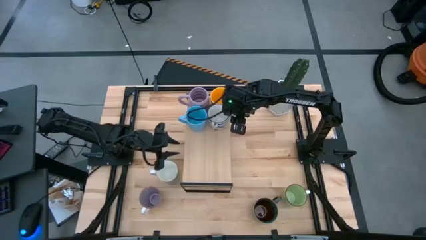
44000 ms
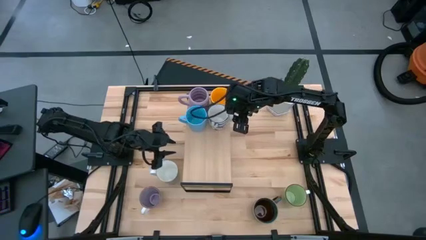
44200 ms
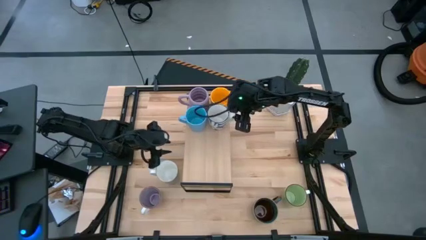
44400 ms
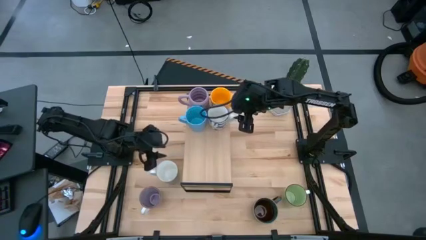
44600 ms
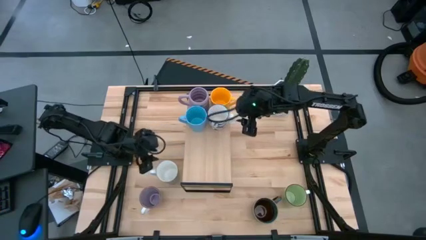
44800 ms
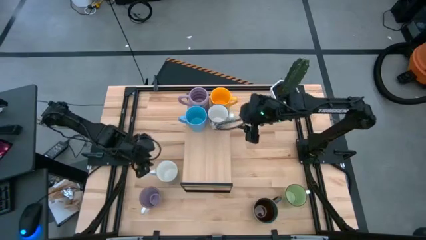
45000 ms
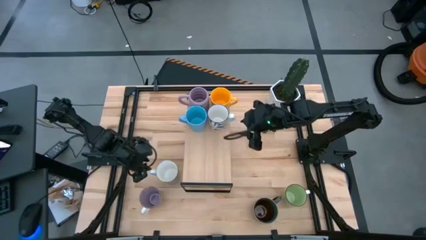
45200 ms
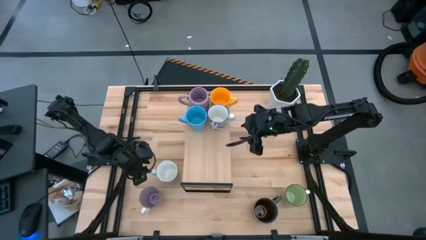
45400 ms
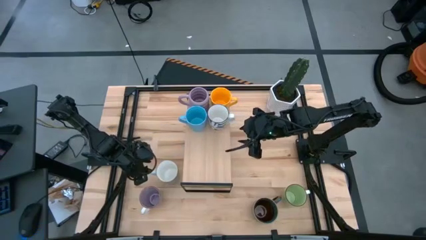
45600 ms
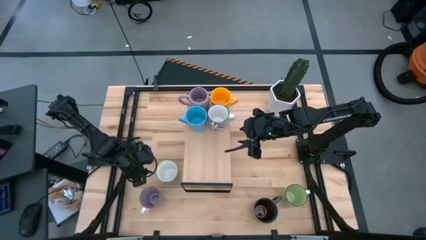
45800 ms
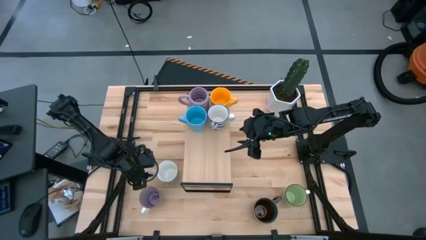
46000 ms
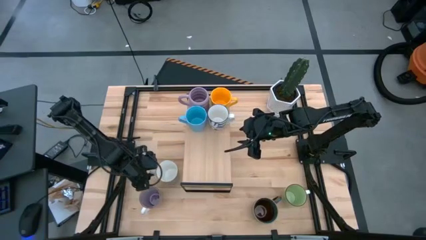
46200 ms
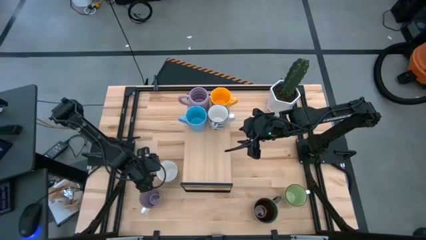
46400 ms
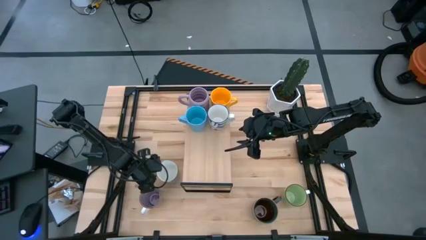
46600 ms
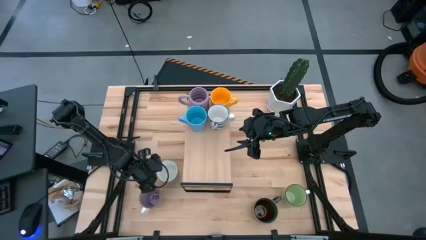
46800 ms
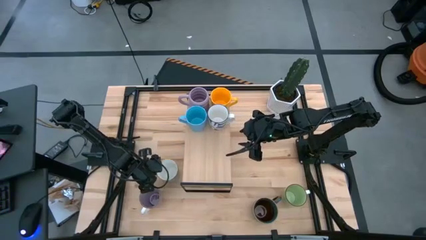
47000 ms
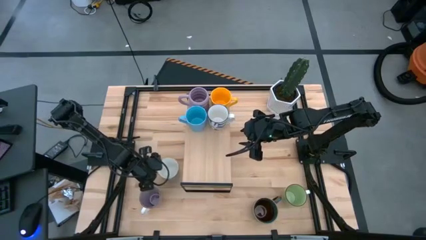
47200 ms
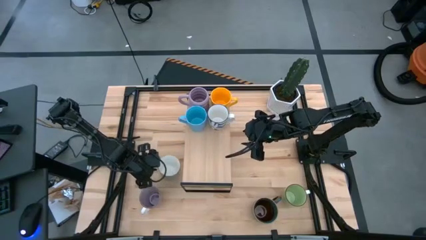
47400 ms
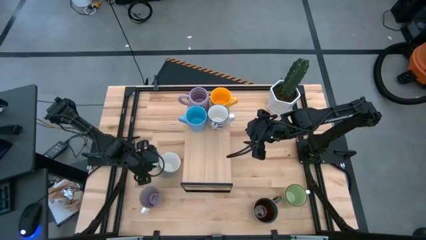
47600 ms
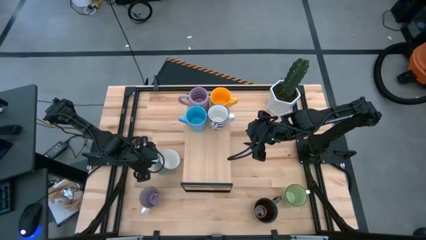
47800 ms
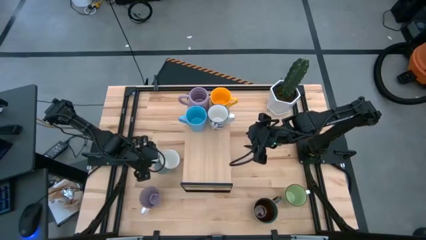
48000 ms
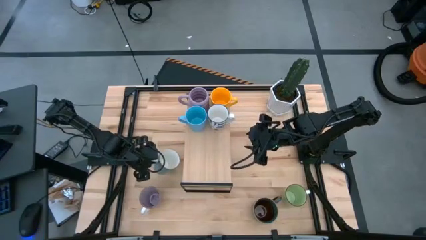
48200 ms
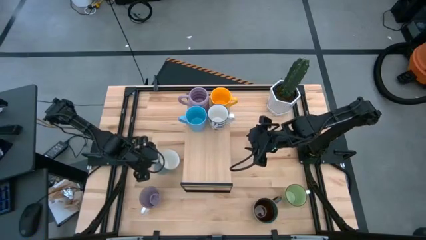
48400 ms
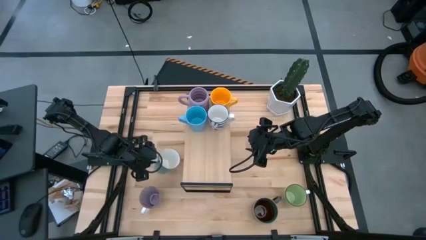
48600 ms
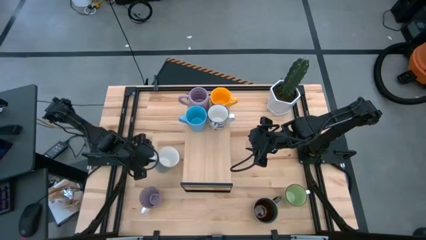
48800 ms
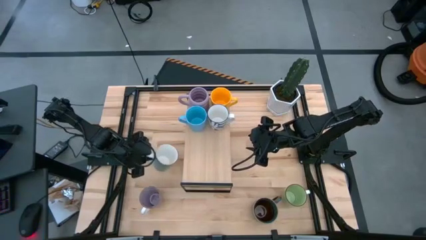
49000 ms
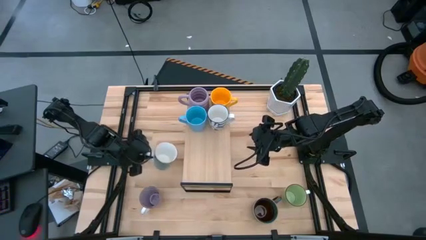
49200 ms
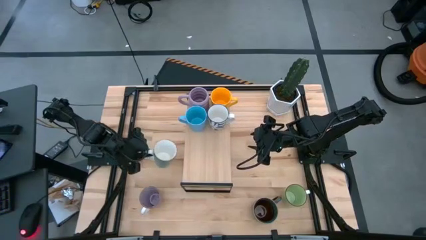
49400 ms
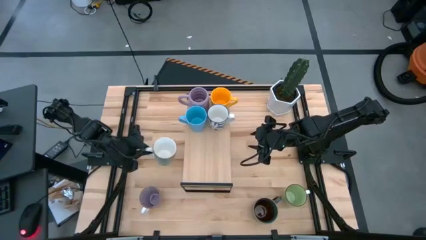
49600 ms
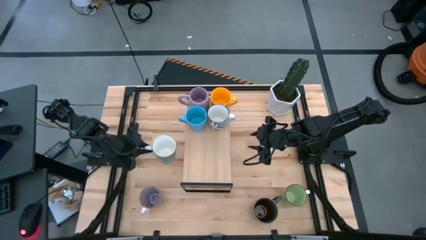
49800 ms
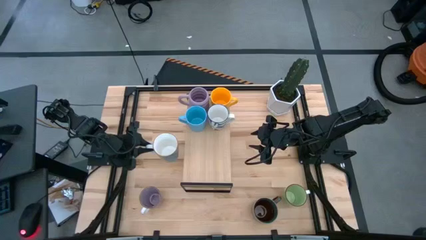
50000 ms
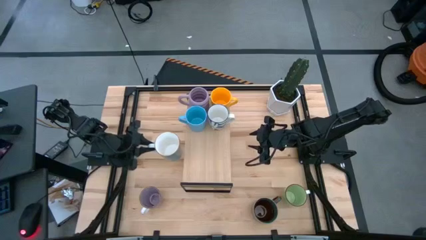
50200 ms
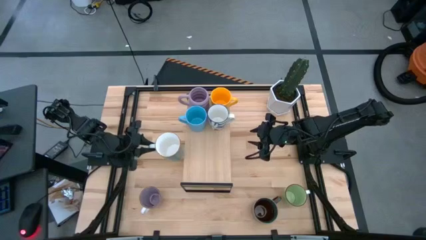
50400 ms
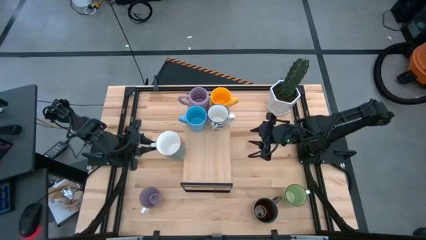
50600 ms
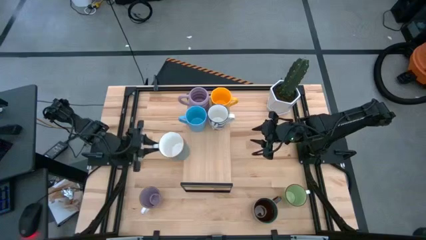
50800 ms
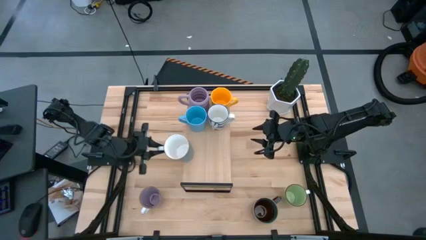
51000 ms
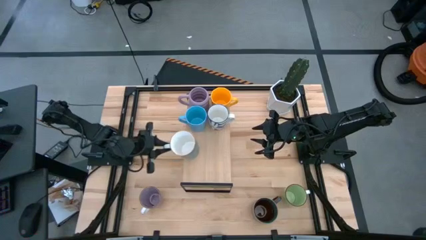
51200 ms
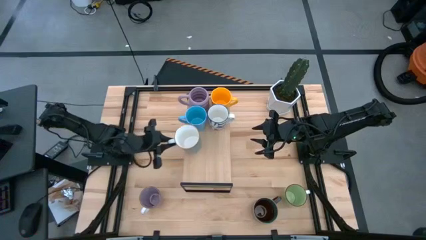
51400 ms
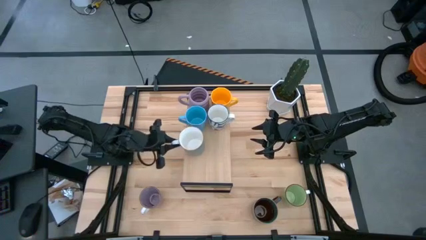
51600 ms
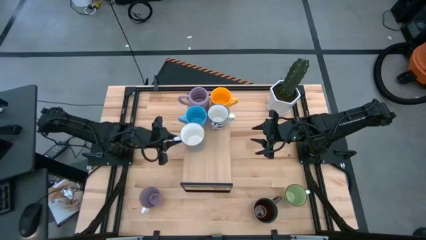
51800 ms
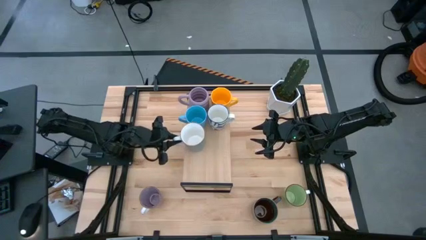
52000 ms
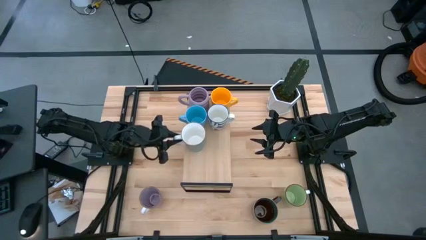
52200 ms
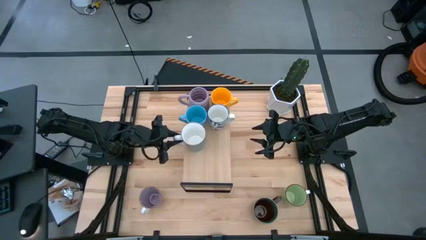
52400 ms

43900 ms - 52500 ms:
Task: Place coffee mugs
Put the blue mug on the shelf

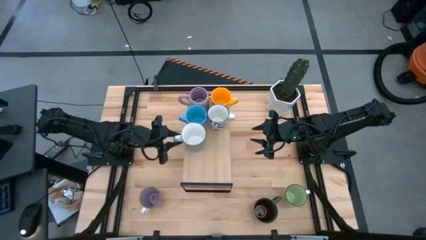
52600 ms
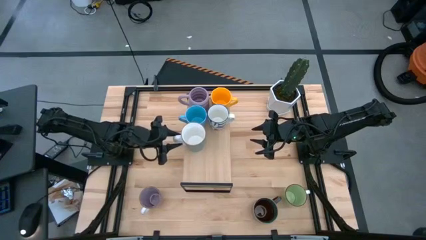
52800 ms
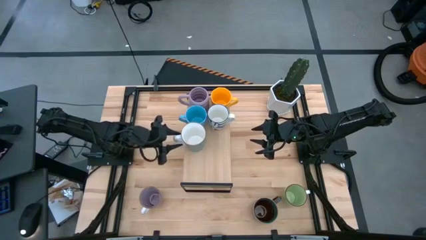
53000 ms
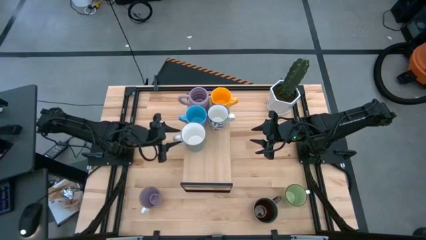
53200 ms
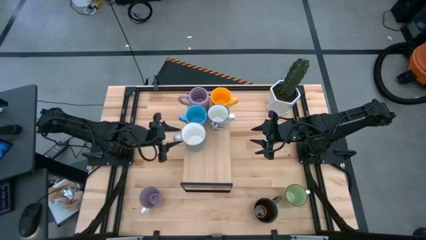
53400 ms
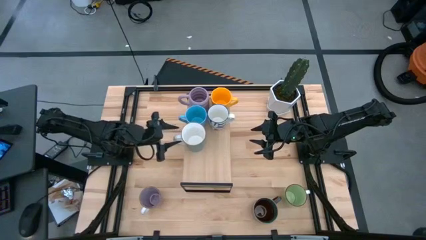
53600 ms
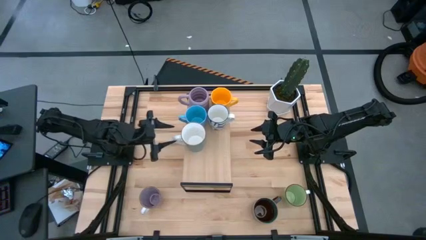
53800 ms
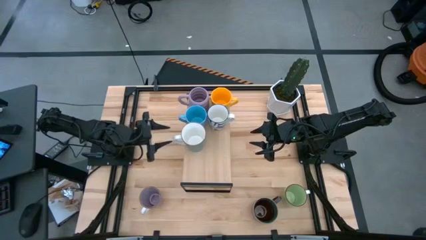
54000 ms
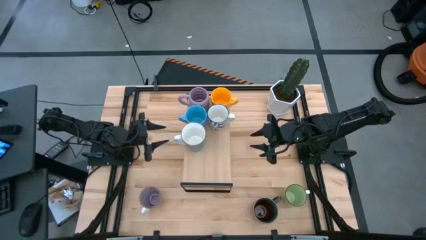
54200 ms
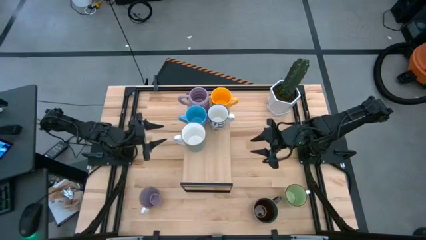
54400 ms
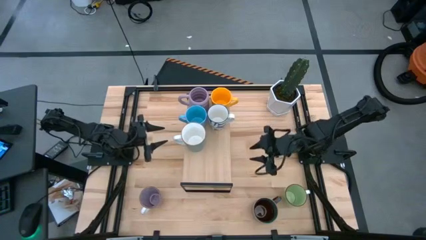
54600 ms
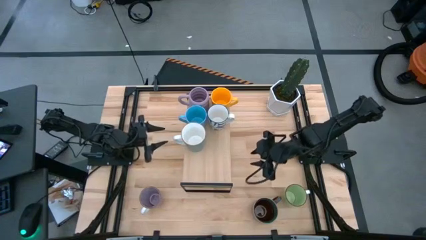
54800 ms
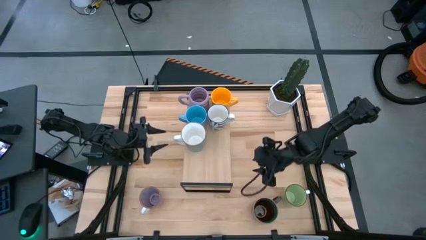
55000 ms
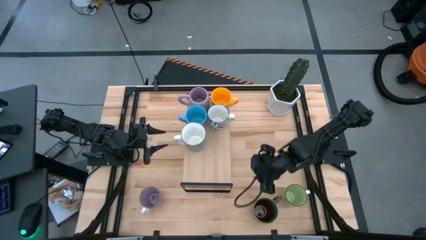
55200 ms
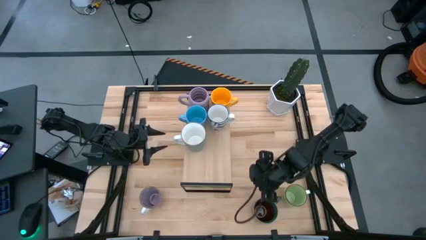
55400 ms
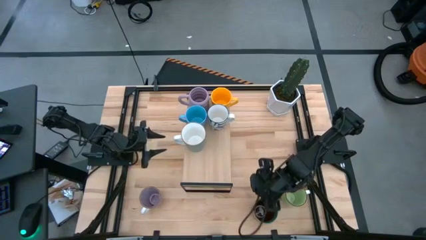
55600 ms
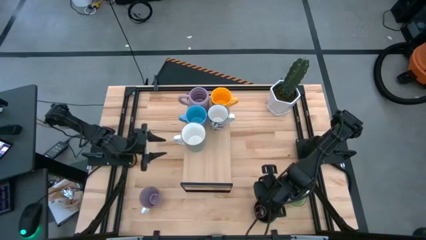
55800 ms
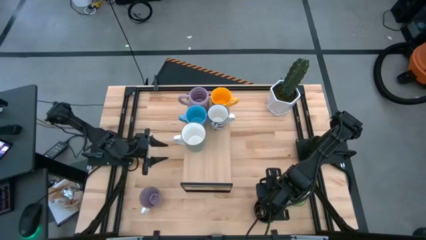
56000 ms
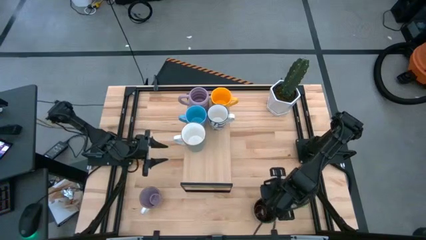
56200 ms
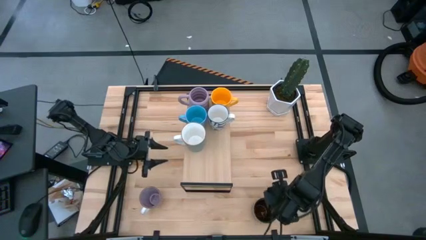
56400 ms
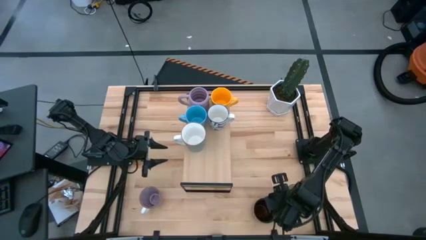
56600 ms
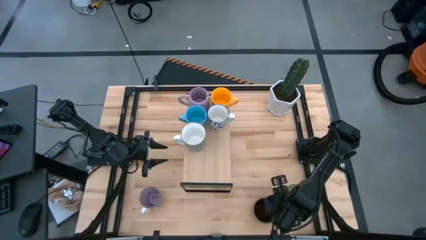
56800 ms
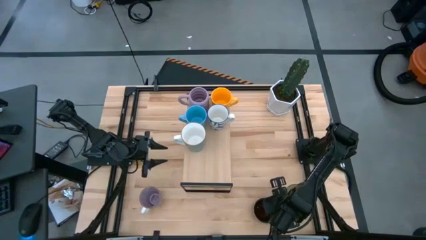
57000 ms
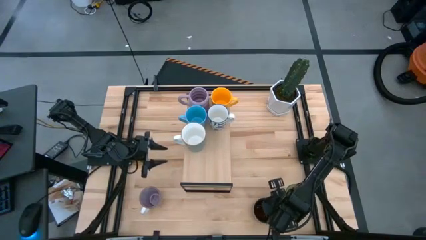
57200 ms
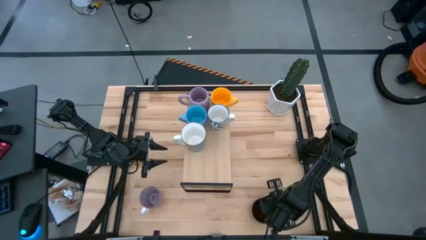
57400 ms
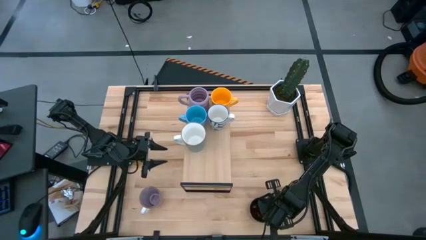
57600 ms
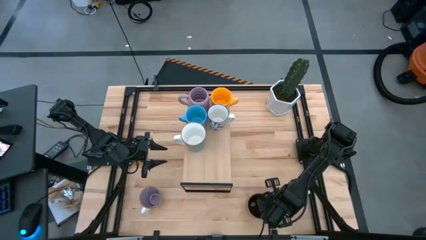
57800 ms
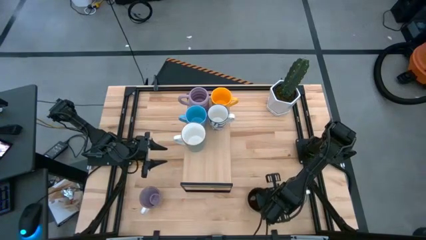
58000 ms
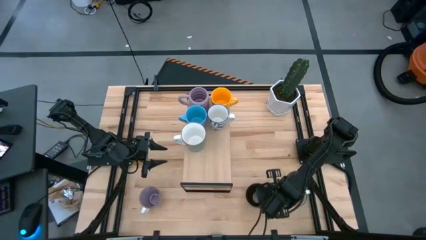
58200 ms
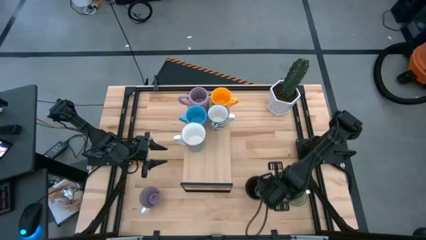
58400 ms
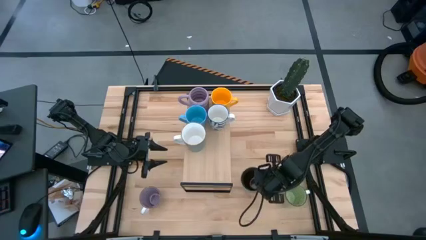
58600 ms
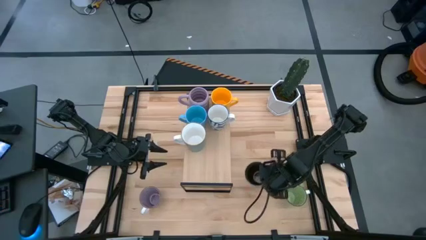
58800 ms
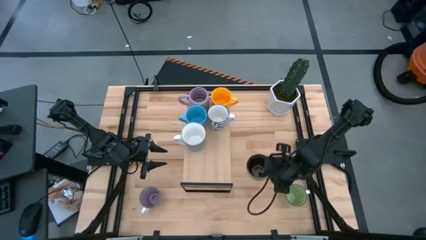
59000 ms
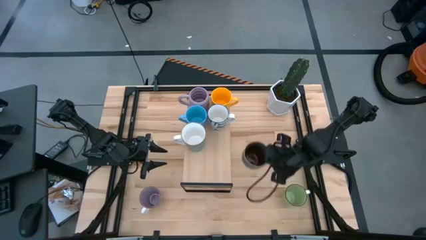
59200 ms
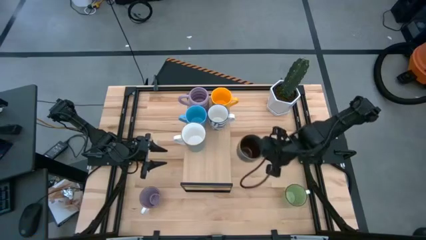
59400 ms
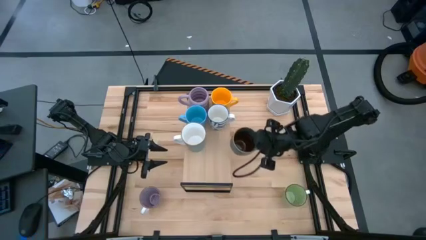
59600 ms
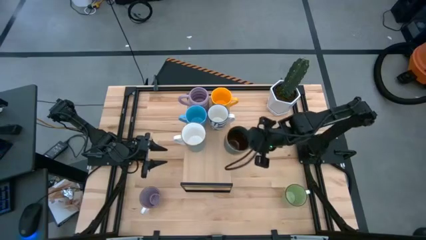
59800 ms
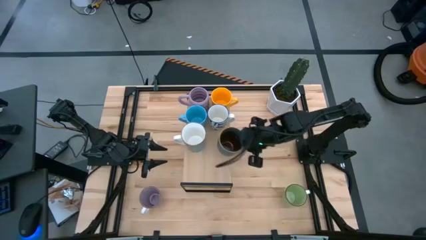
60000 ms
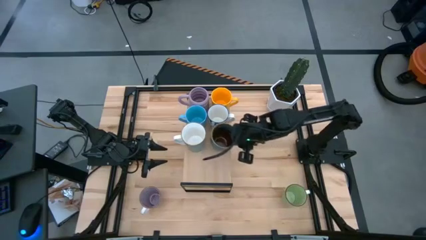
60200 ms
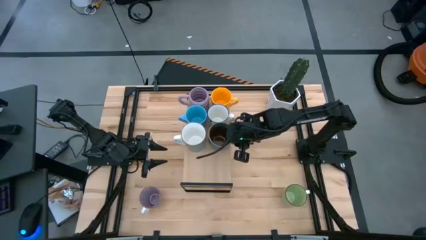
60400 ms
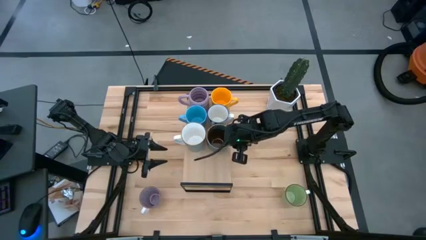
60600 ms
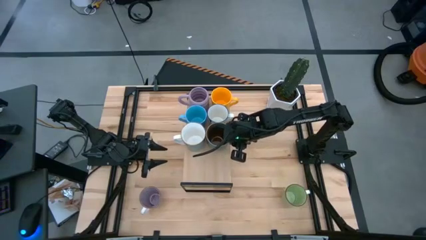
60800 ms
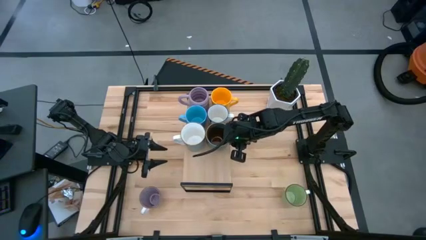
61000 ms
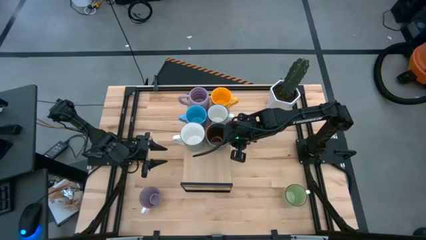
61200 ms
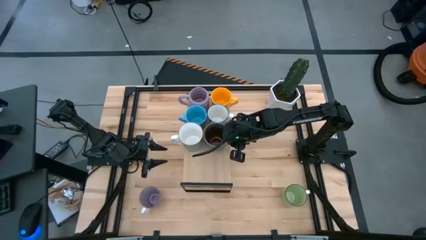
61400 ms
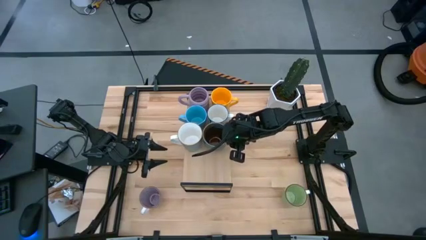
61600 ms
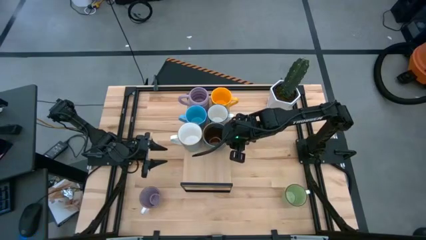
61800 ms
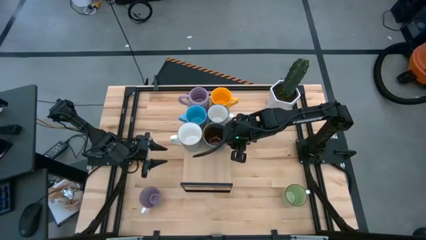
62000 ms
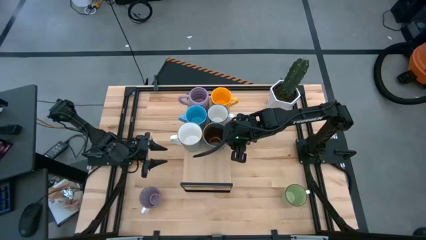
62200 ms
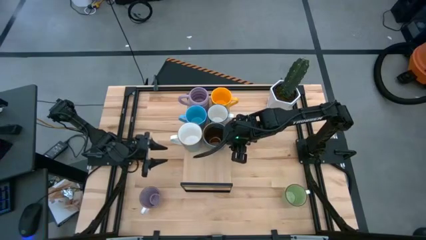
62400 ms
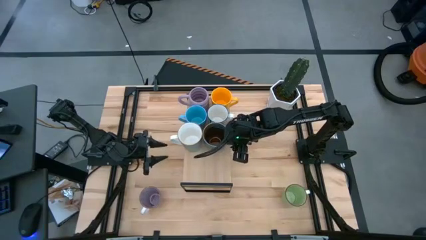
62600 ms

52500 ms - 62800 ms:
Put the brown mug on the shelf
